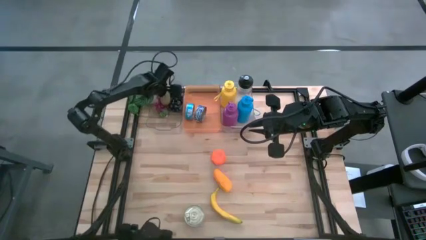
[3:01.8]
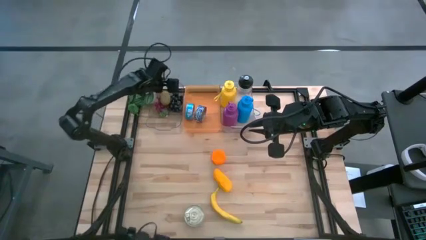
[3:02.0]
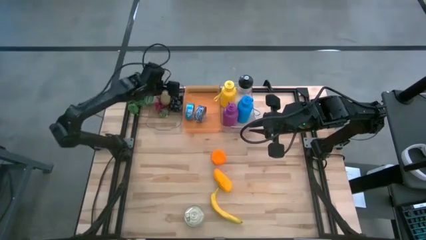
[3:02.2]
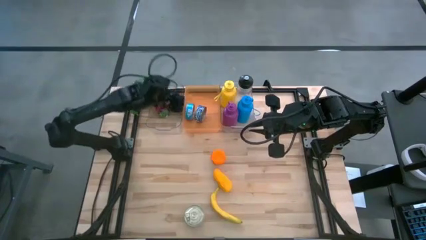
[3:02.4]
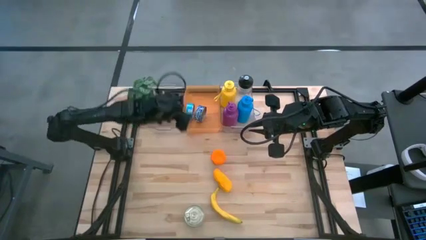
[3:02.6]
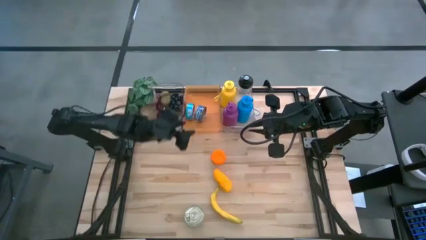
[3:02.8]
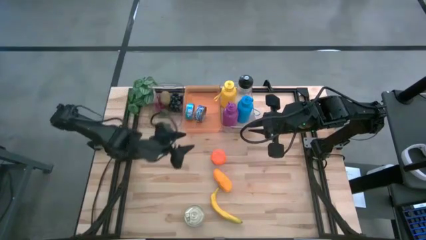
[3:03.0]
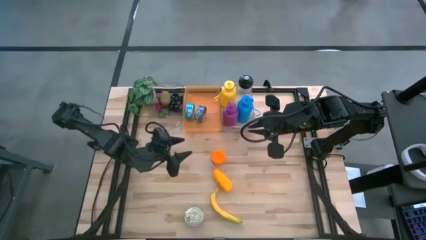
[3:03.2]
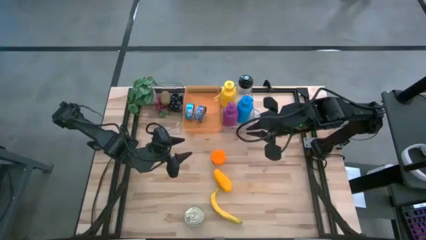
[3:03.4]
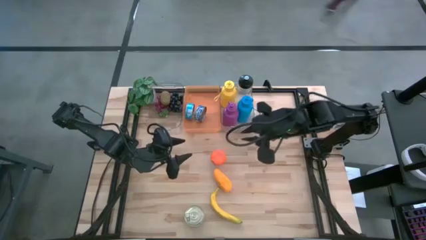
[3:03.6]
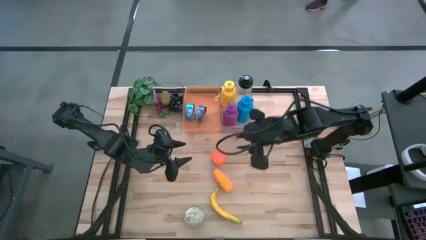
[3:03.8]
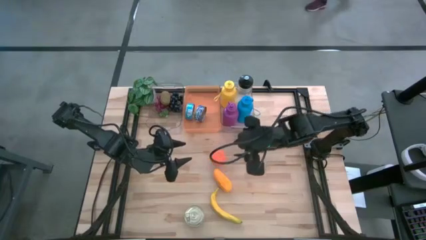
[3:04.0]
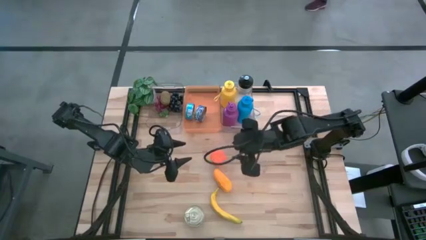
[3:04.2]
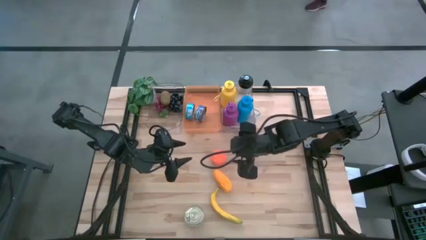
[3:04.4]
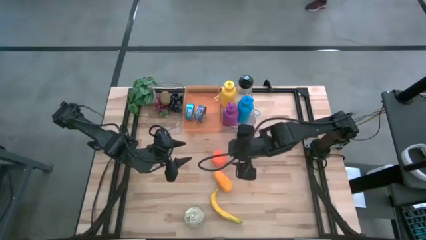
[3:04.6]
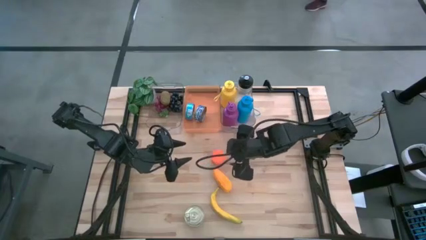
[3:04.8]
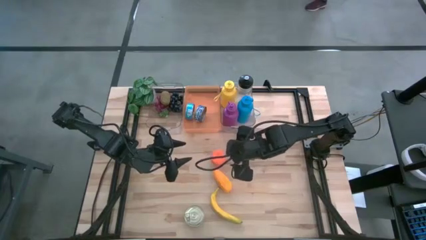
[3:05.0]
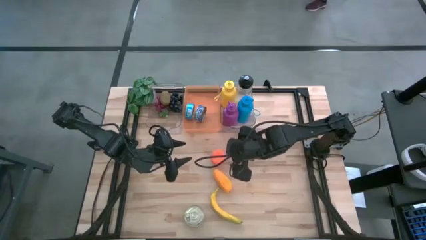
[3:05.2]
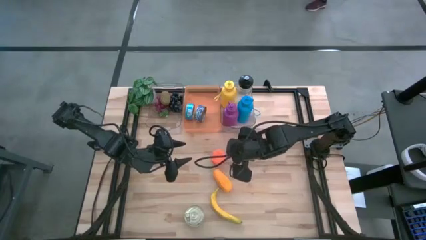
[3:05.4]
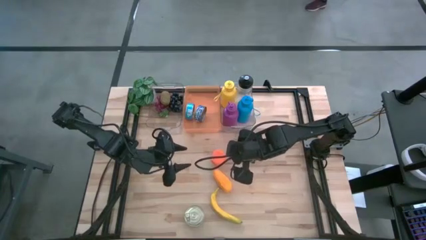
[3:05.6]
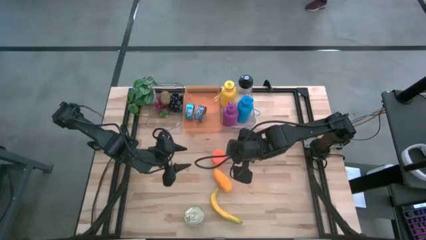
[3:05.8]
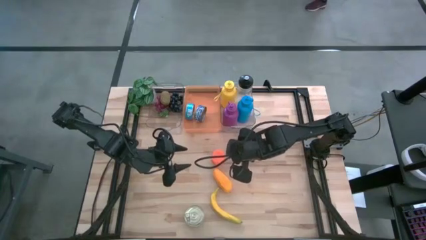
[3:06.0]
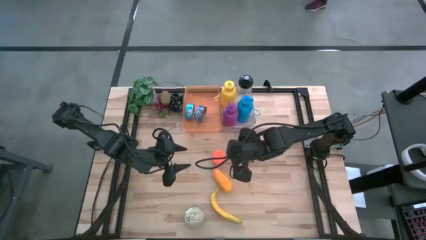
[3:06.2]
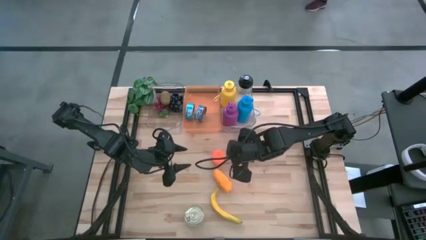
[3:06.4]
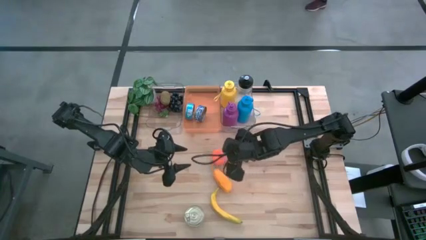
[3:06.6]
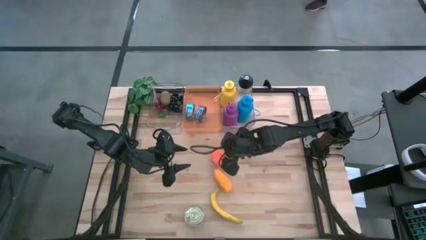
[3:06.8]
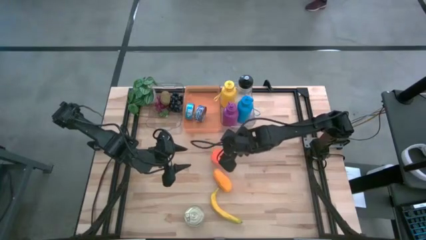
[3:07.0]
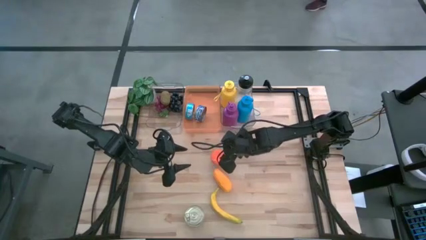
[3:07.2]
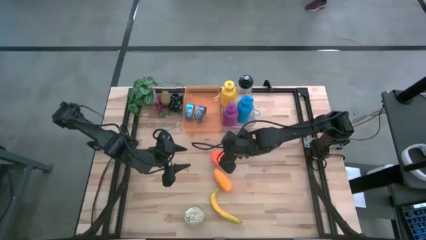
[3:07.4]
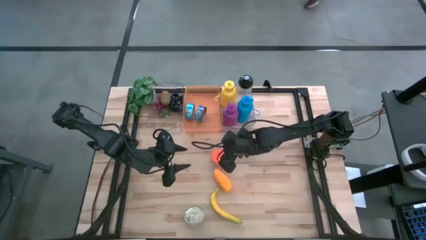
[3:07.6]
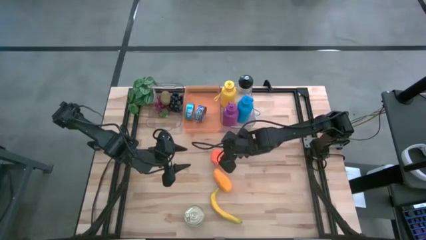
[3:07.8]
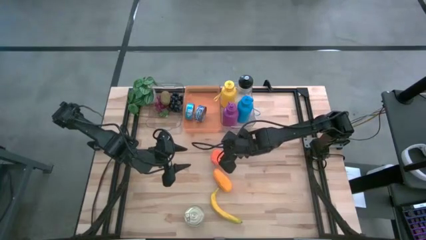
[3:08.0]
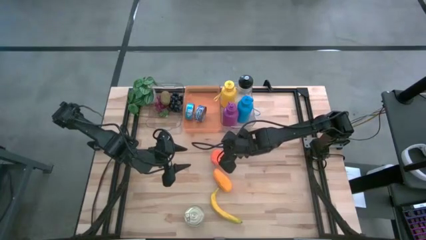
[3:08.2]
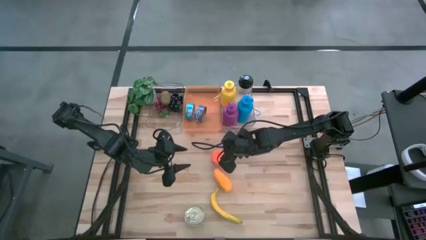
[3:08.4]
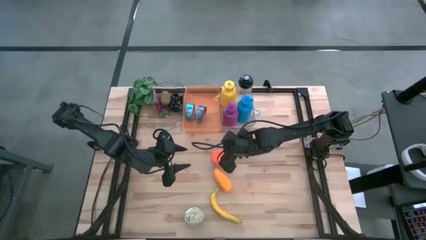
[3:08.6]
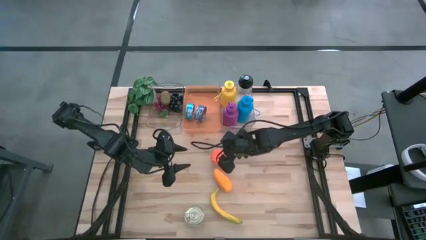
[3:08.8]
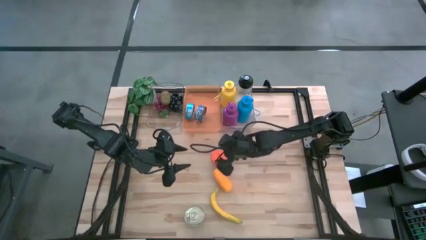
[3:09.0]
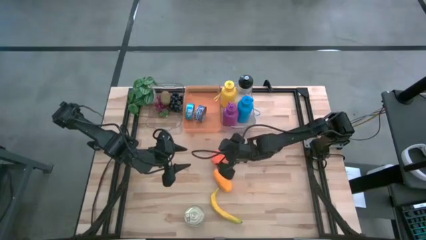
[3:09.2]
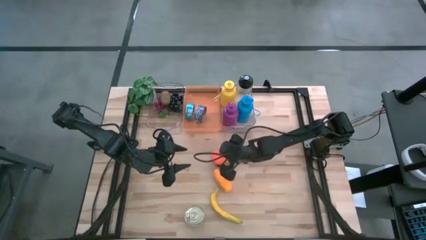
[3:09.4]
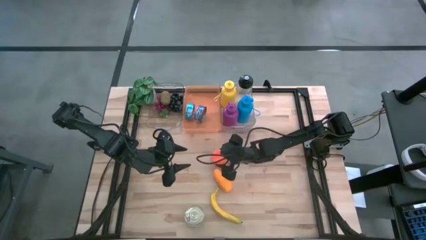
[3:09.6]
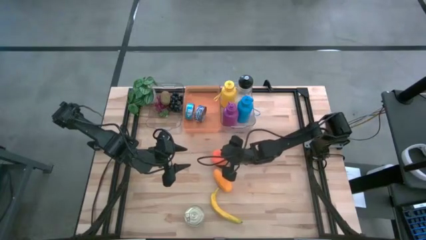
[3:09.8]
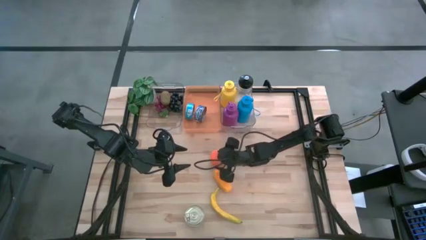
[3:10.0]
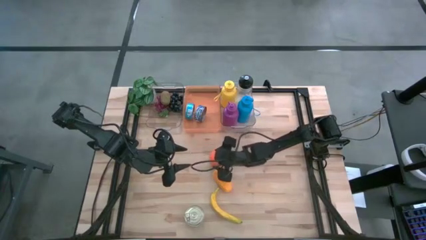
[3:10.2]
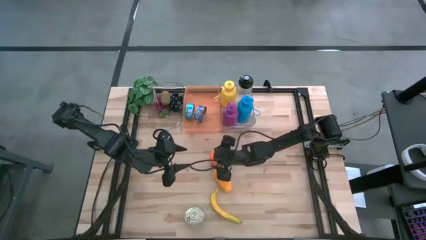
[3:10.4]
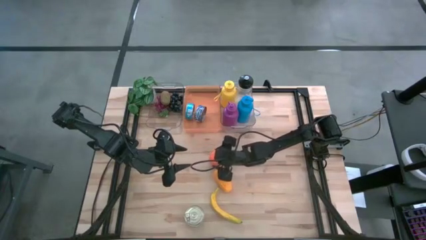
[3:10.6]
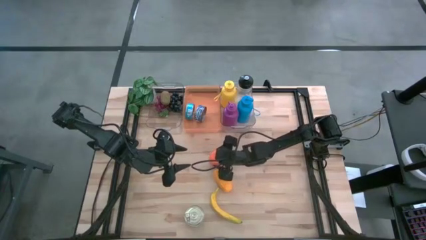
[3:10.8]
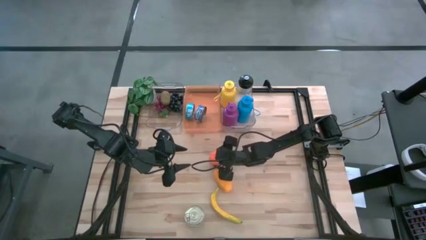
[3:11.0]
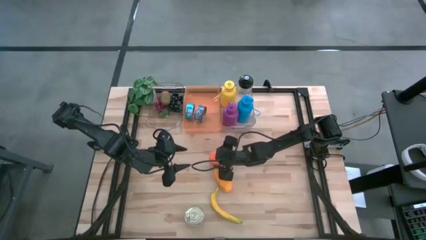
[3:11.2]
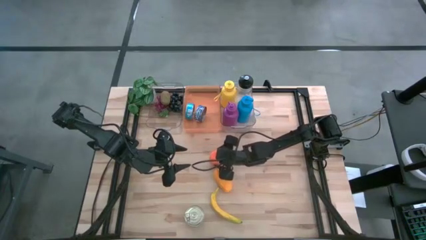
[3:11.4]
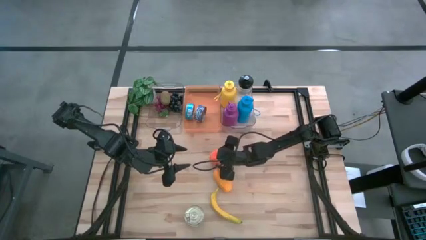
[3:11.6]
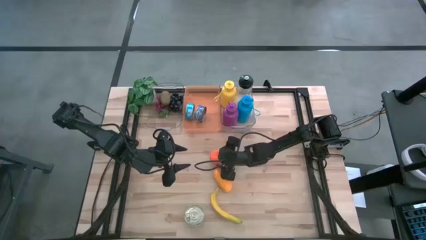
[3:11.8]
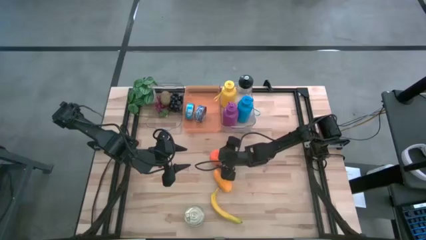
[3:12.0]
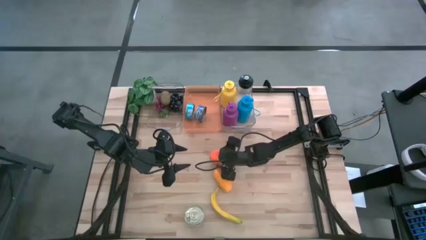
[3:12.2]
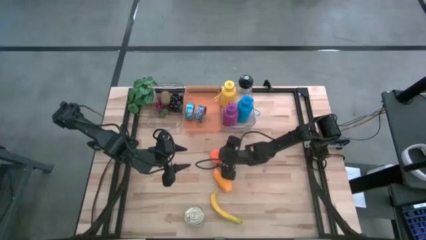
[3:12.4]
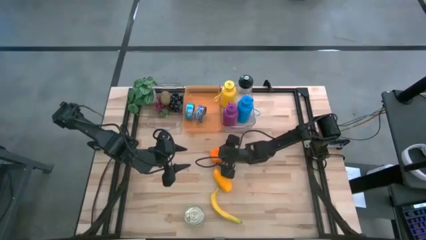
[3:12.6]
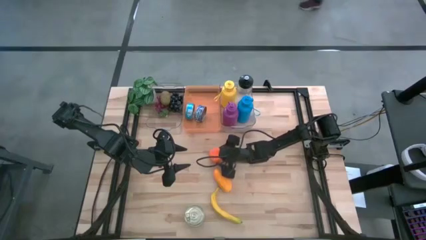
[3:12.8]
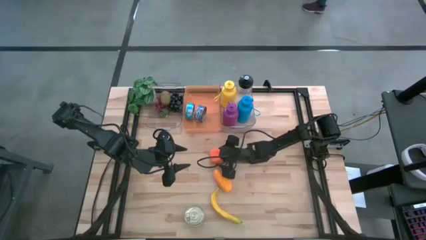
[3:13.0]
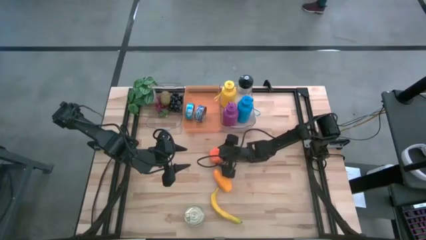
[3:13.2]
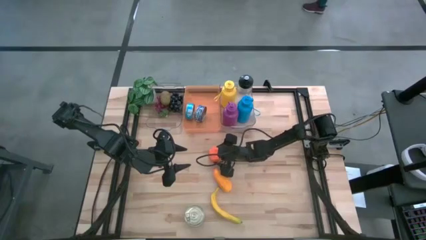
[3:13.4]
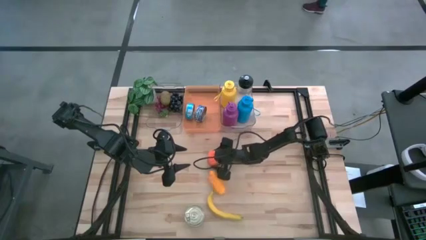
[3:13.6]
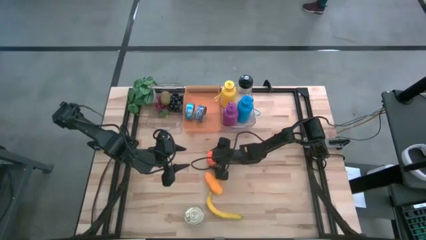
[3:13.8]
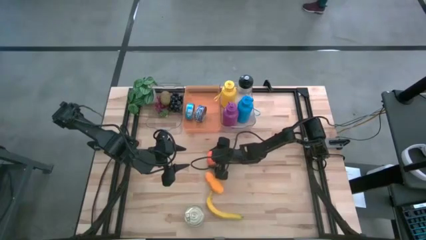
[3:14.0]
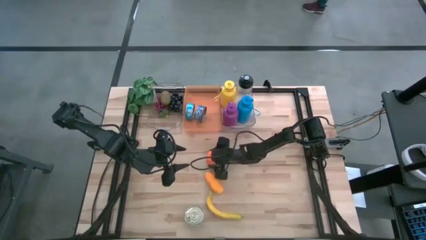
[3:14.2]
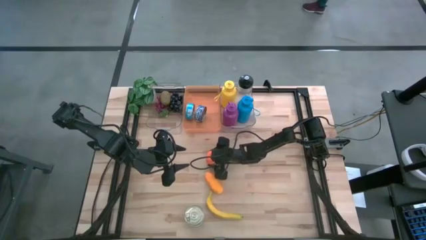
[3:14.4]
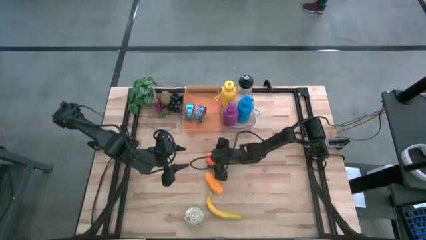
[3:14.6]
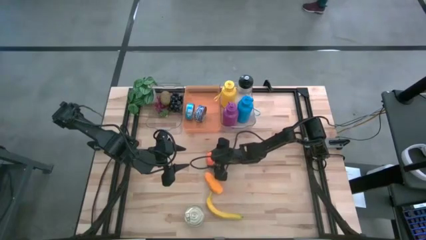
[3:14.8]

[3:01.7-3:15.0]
Task: Pick & Place Food Item
Put the orange into the left transparent bin

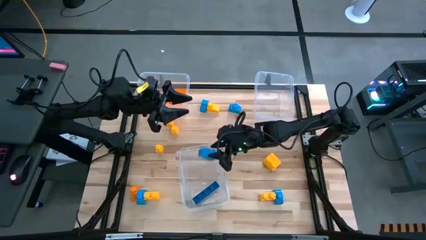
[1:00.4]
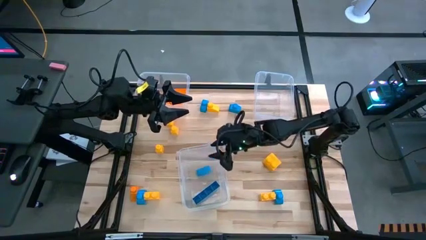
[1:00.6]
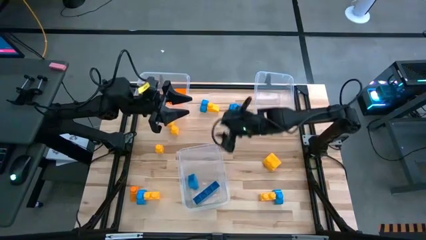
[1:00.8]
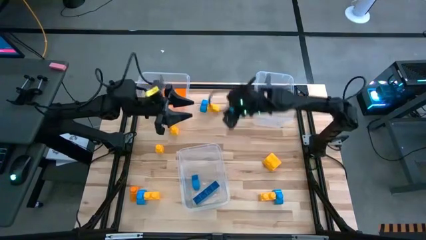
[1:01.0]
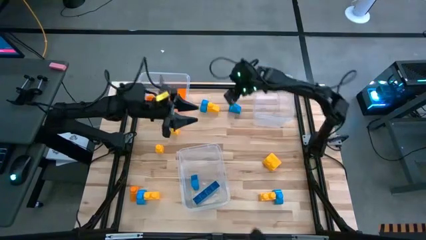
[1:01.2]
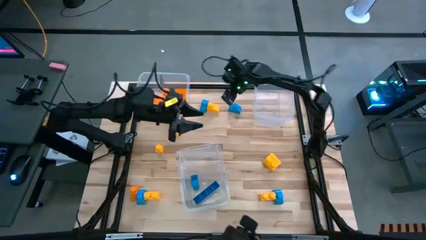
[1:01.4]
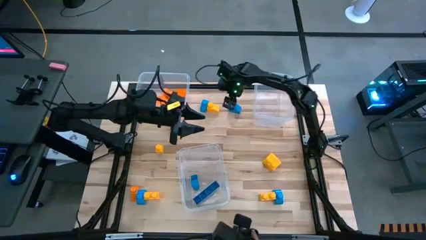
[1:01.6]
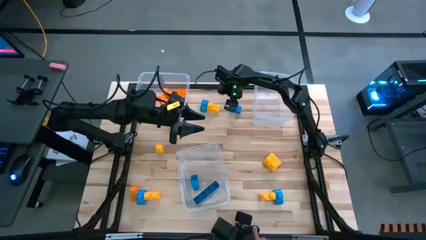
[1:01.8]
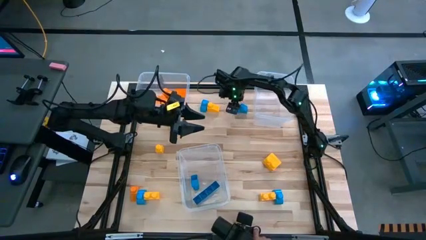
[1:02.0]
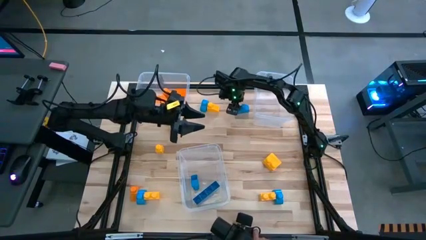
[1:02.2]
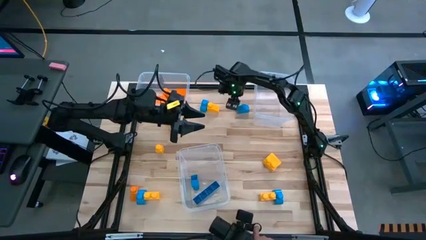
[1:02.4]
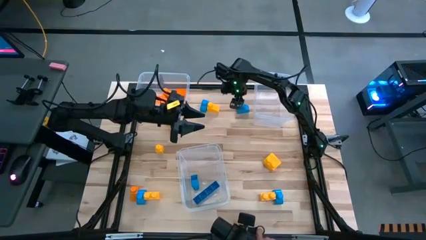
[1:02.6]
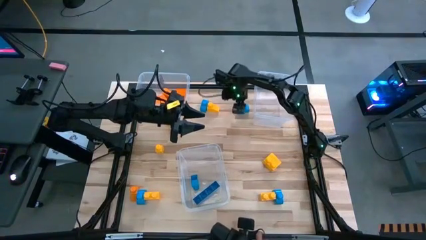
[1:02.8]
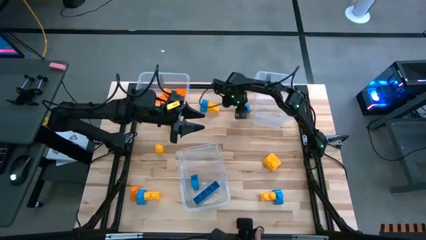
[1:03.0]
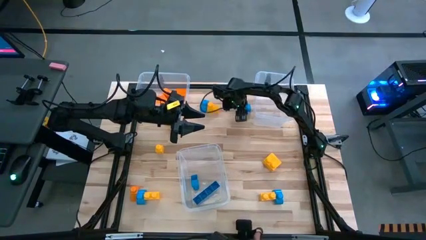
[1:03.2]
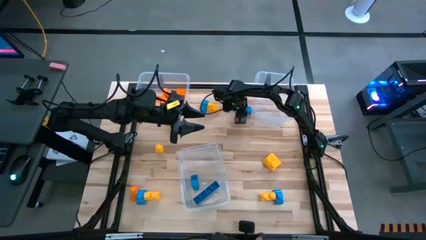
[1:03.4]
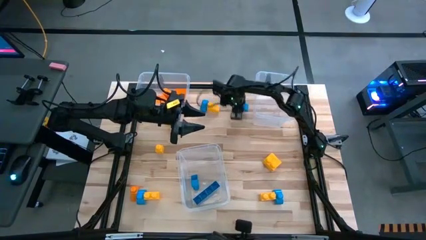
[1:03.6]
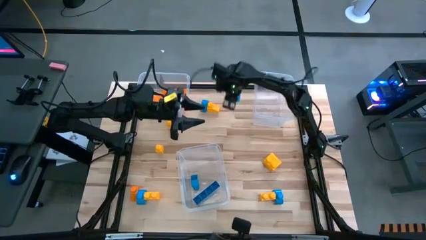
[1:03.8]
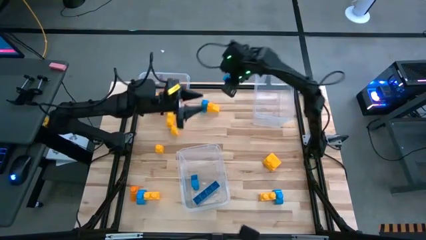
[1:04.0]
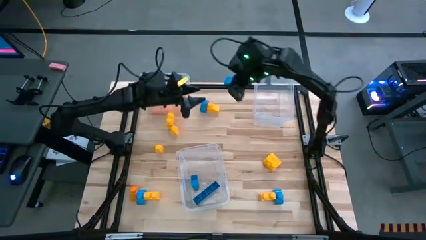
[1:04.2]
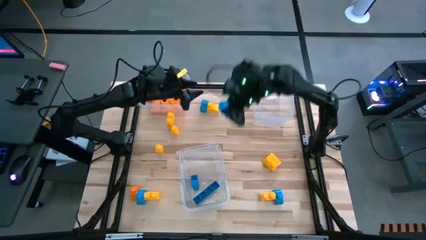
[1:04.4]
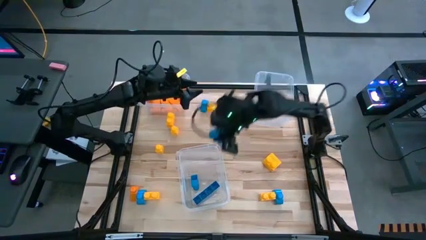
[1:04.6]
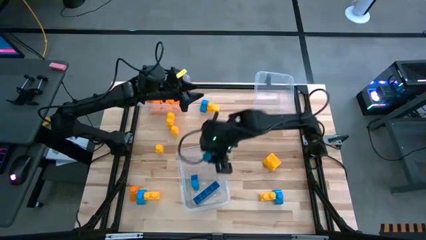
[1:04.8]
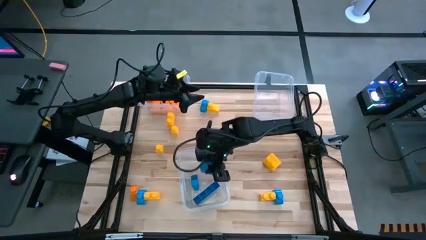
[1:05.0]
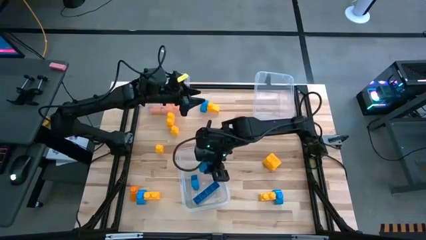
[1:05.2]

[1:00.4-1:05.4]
Task: Sort blocks
Put the blue game piece into the bottom transparent bin
